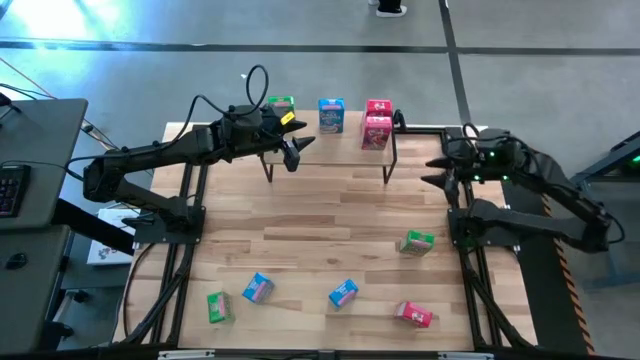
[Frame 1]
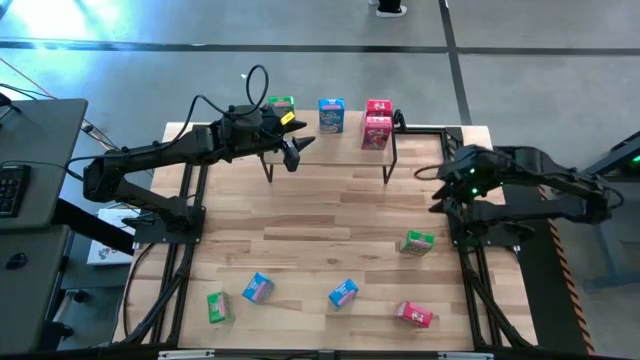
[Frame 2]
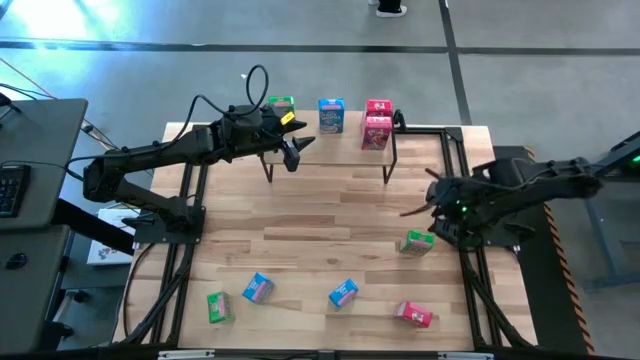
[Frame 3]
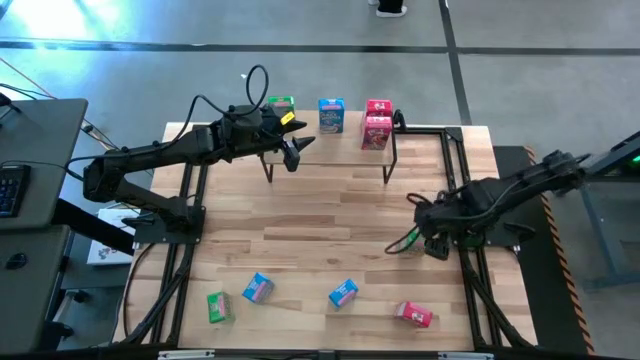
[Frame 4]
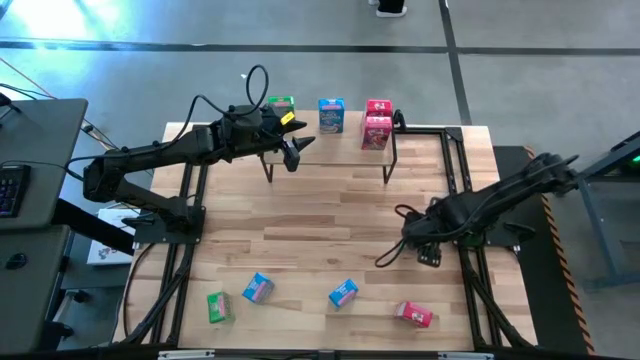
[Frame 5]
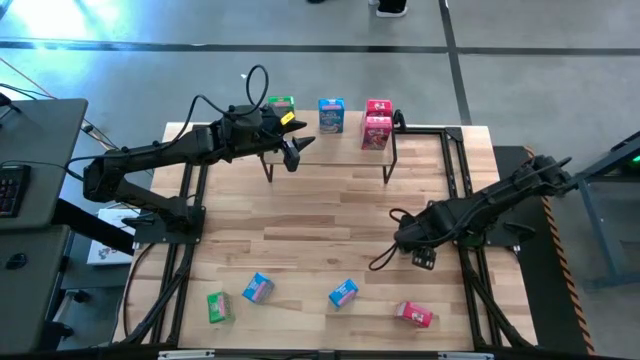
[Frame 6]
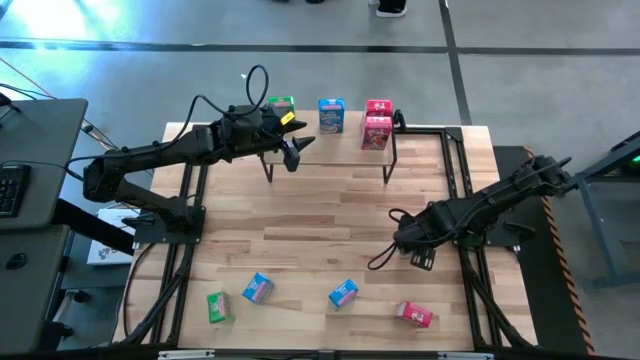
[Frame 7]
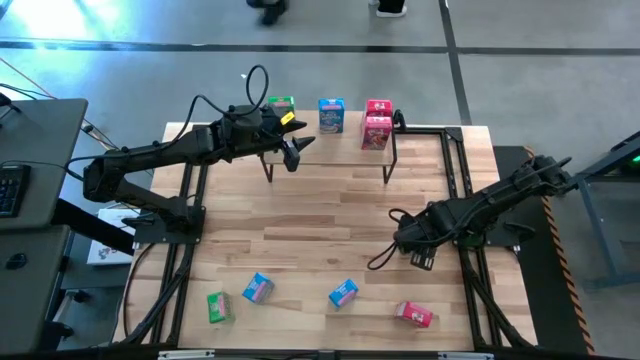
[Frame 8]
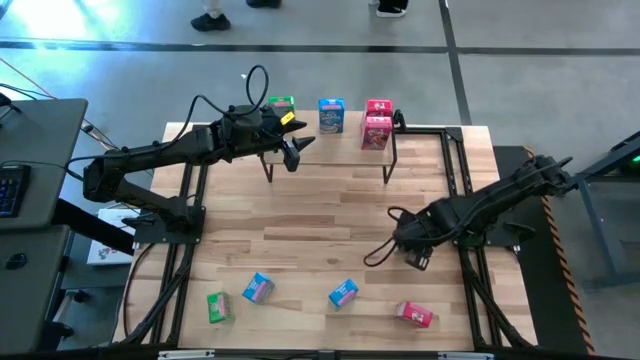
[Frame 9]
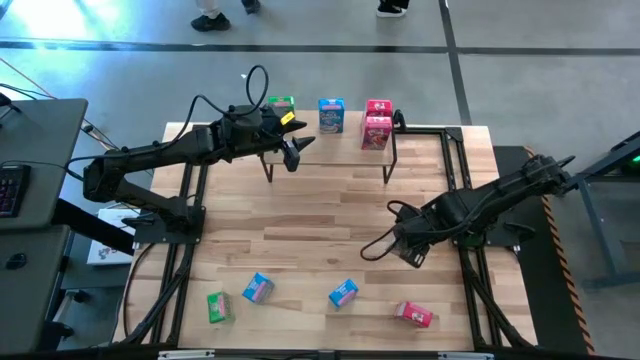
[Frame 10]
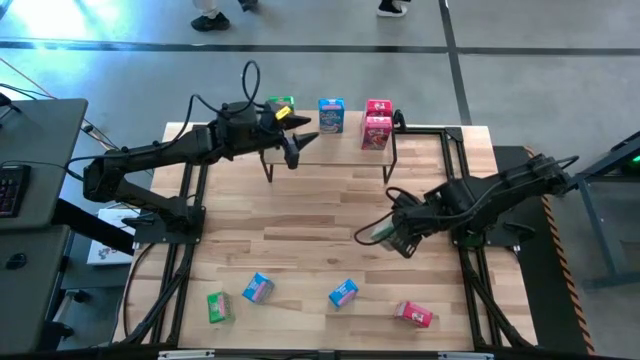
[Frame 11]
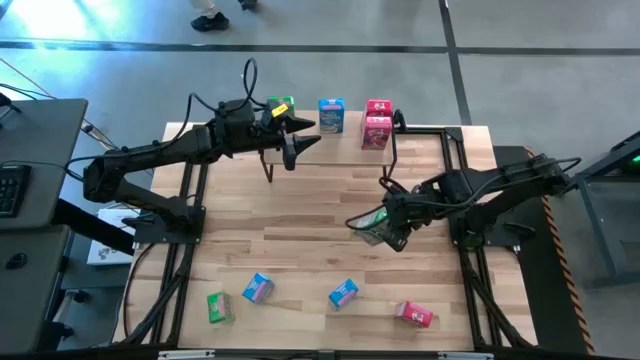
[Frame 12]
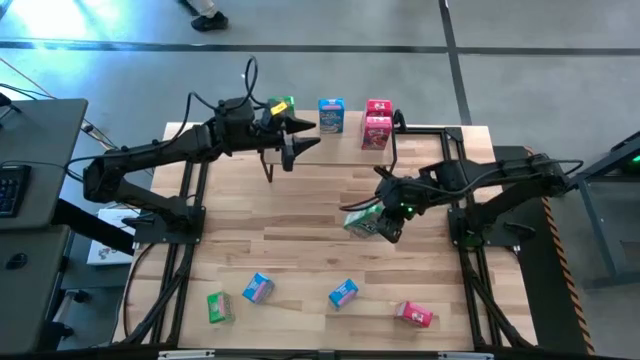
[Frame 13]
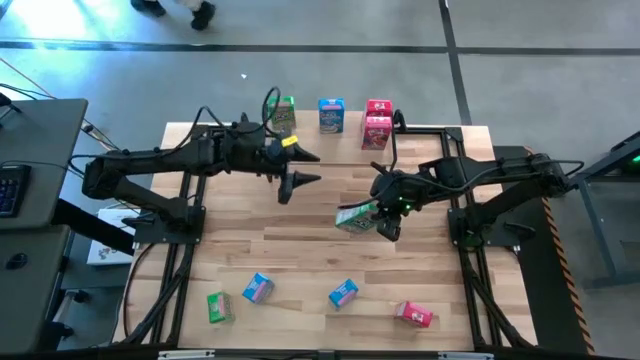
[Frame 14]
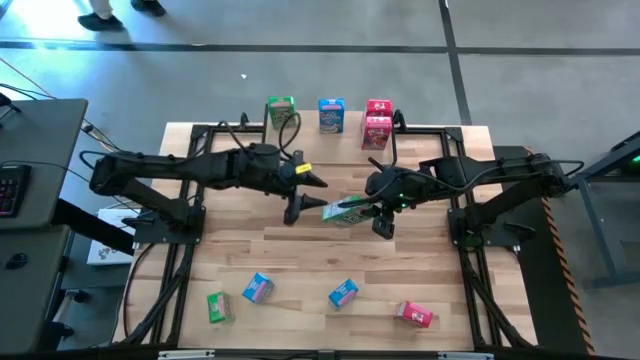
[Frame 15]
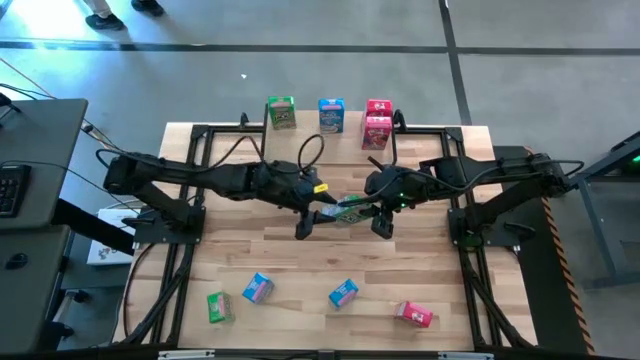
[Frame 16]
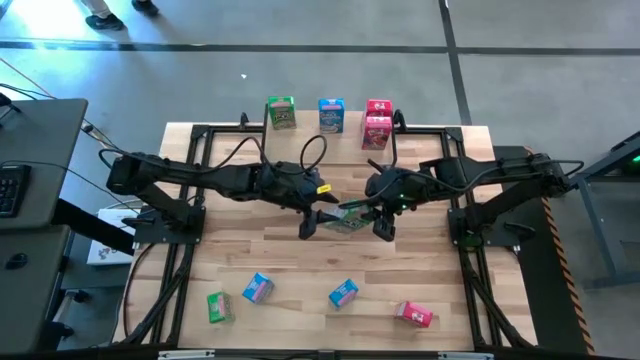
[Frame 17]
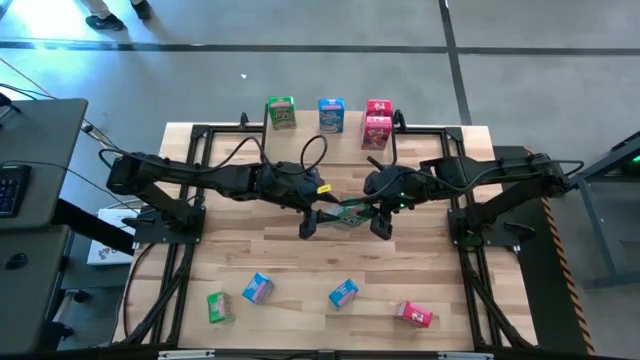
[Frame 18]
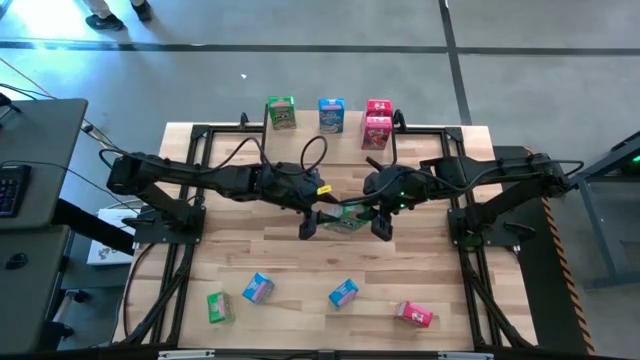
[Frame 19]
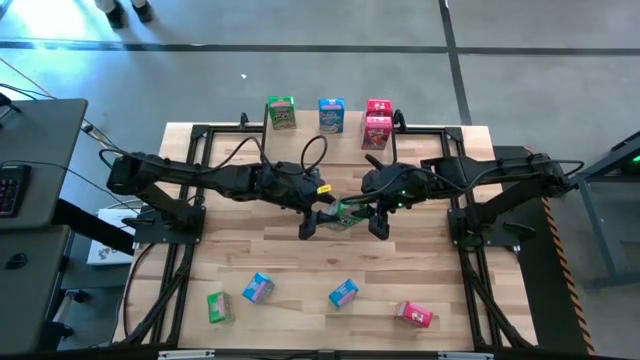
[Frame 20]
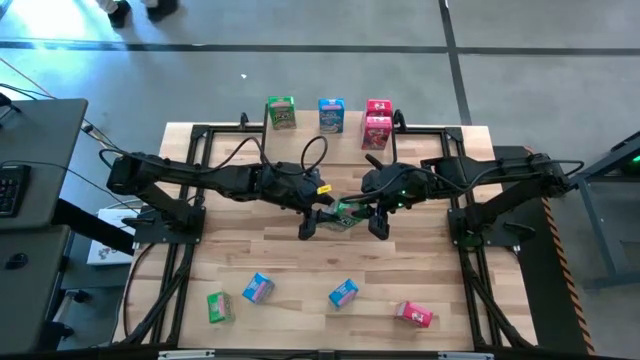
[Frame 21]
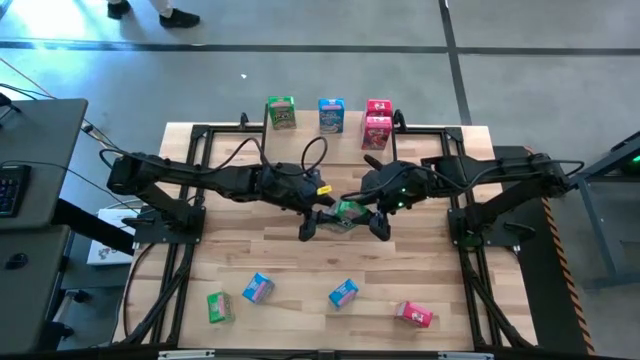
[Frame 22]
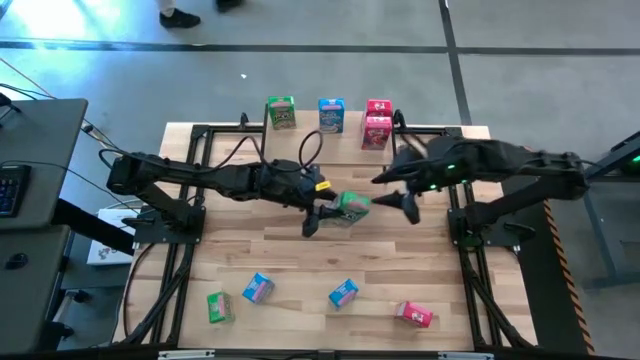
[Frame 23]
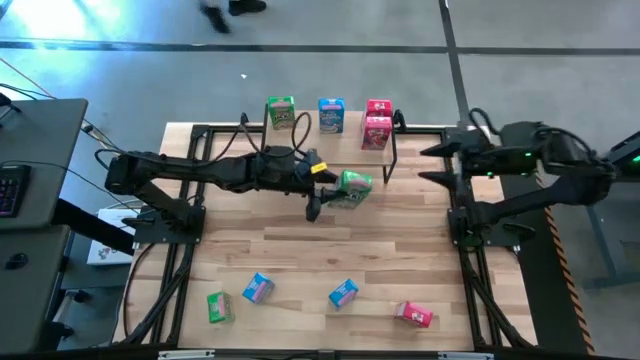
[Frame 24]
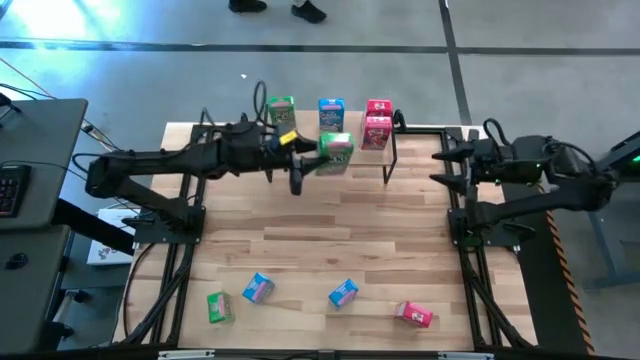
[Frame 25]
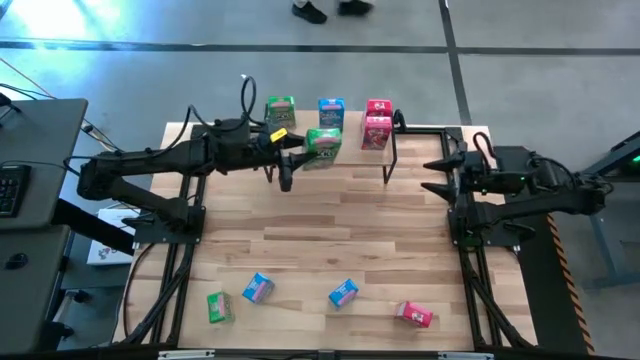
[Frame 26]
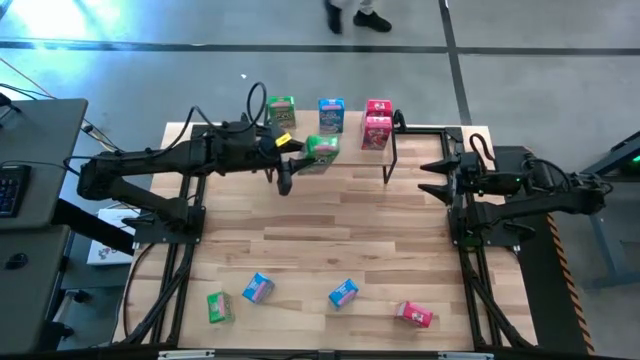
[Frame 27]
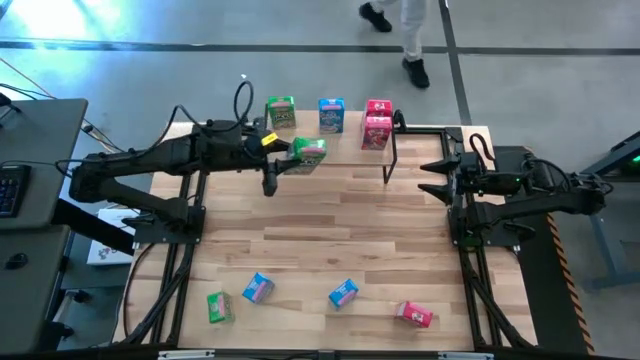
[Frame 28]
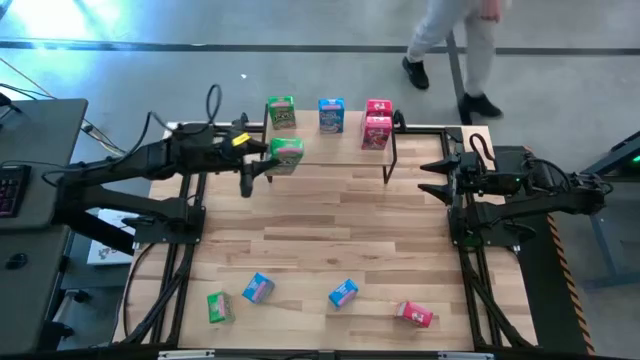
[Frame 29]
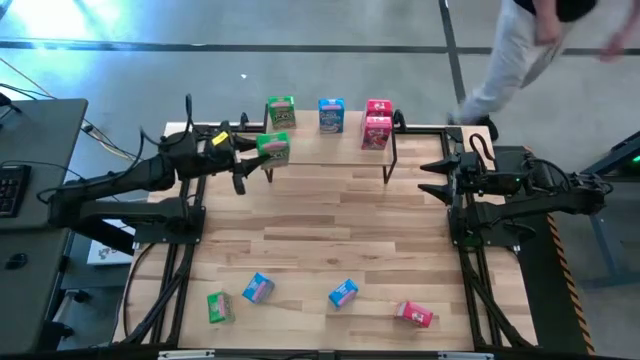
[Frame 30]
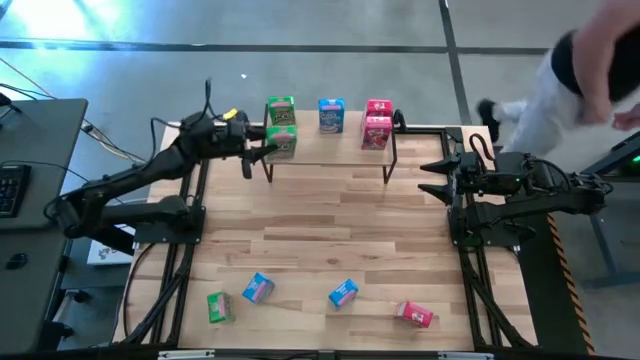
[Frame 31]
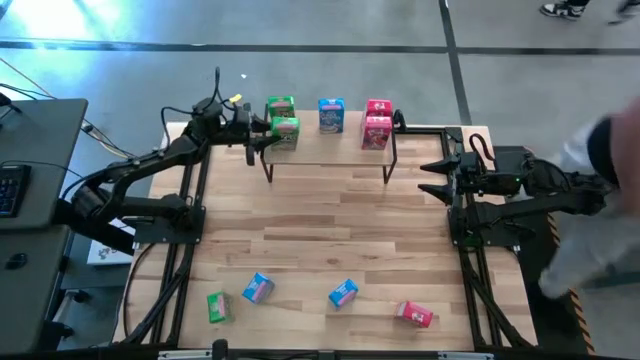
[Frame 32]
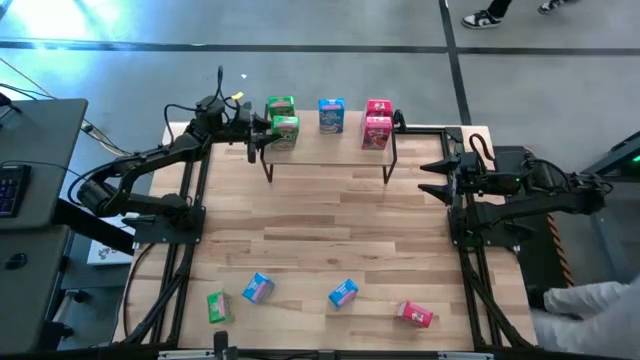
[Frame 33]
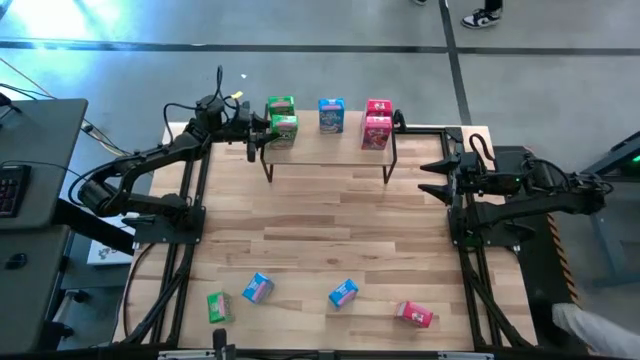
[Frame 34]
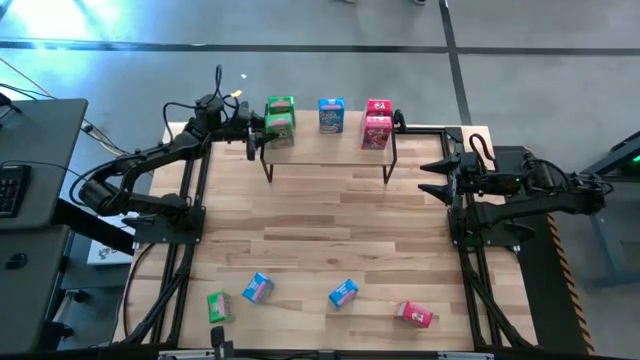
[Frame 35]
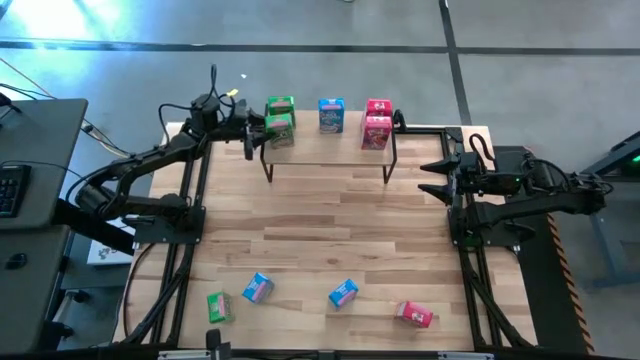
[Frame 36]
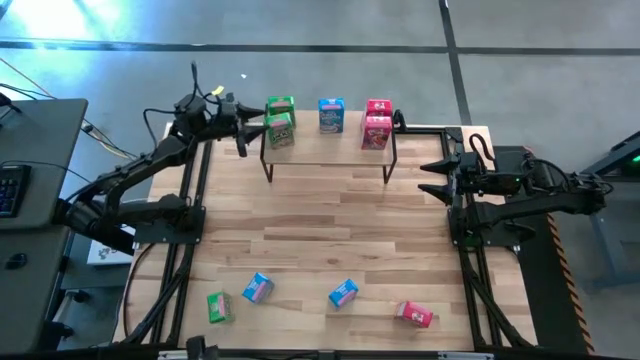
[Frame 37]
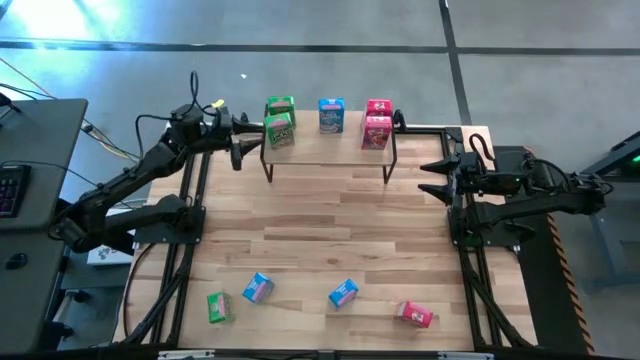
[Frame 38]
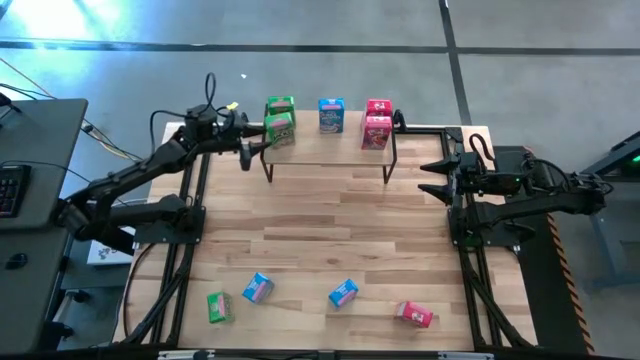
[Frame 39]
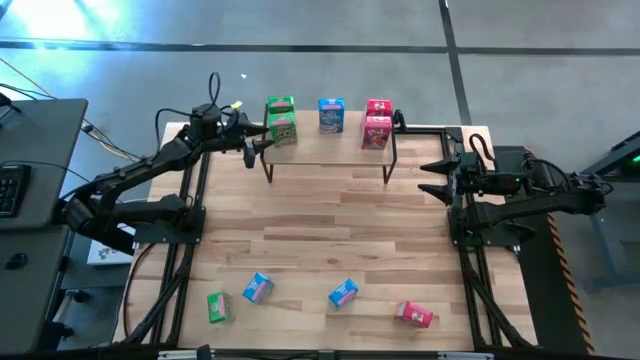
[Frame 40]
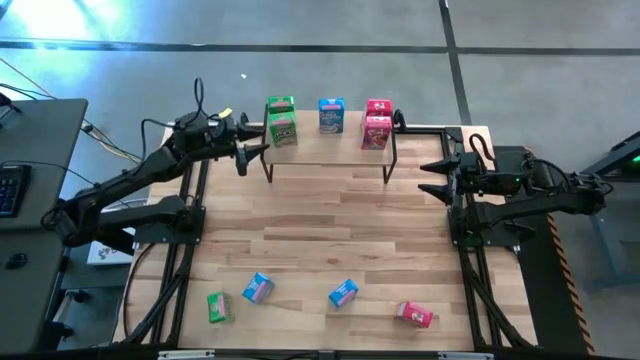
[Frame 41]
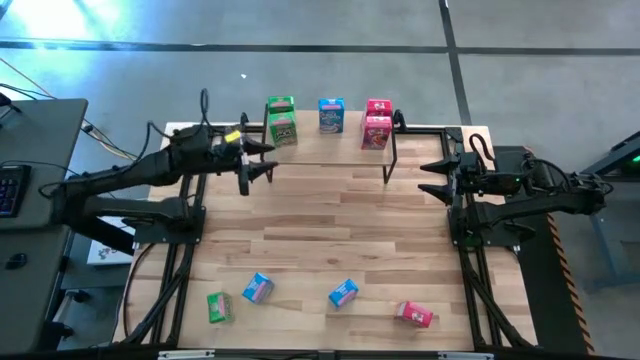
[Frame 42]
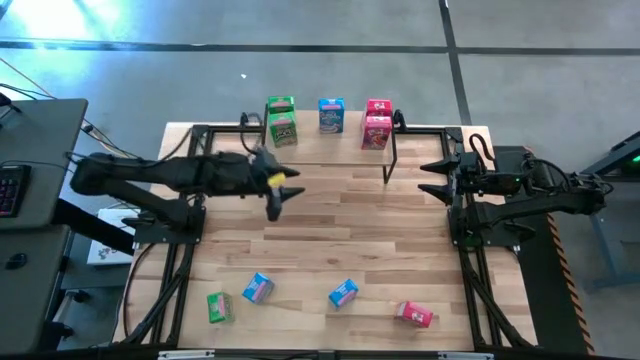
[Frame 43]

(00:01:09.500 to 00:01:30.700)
Task: Stack cereal on shelf
Put the bottom green cereal box on the shelf
